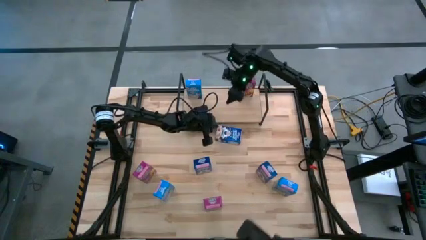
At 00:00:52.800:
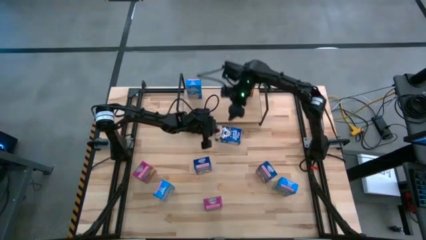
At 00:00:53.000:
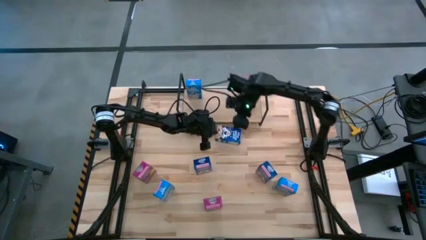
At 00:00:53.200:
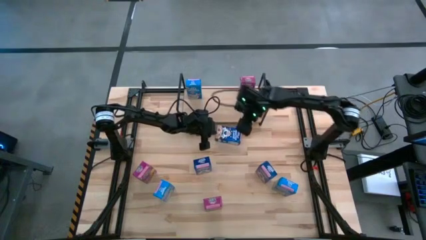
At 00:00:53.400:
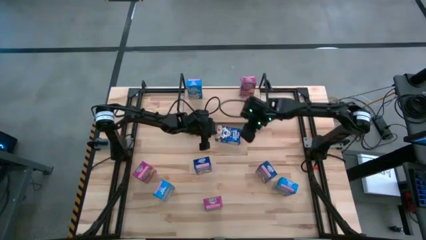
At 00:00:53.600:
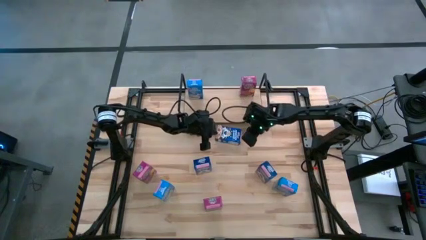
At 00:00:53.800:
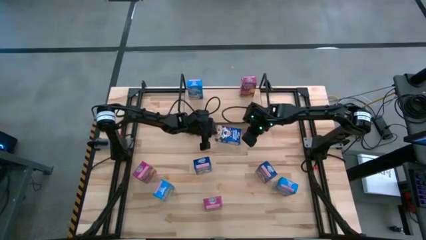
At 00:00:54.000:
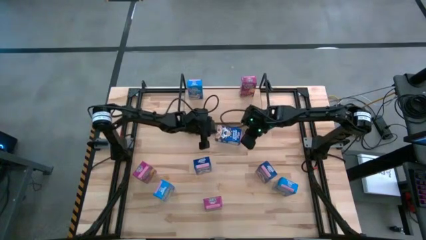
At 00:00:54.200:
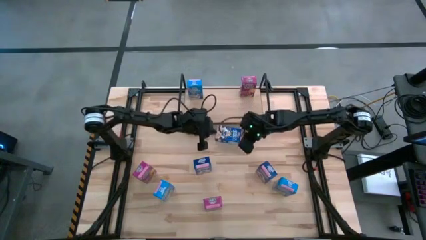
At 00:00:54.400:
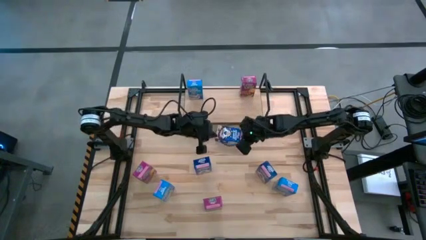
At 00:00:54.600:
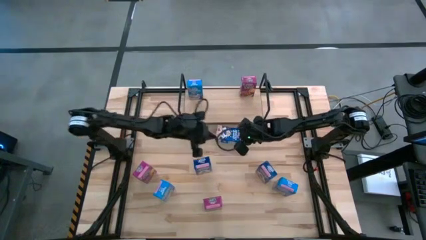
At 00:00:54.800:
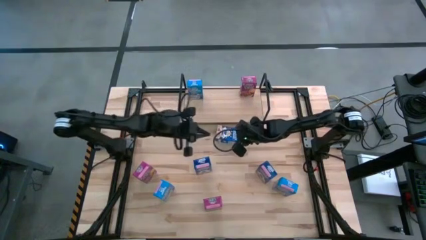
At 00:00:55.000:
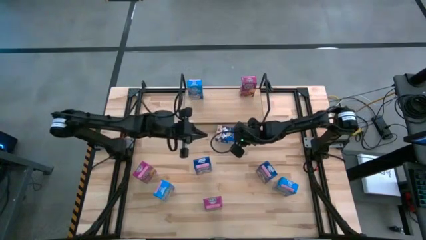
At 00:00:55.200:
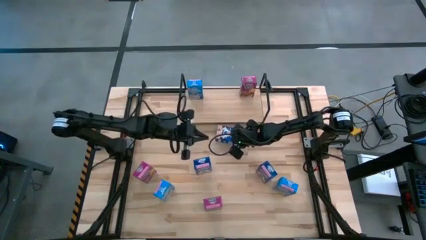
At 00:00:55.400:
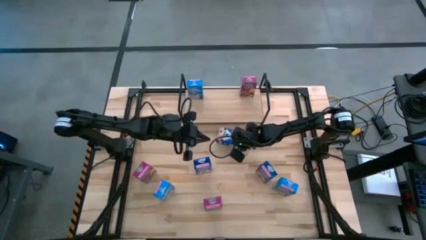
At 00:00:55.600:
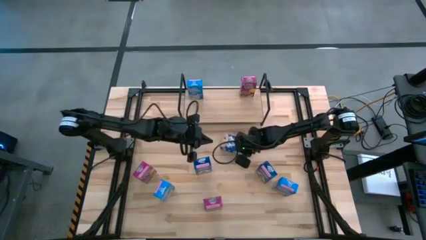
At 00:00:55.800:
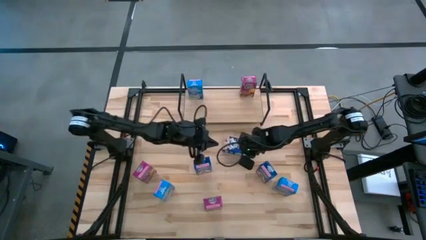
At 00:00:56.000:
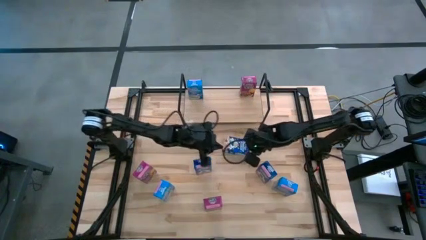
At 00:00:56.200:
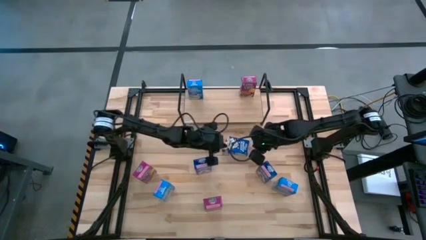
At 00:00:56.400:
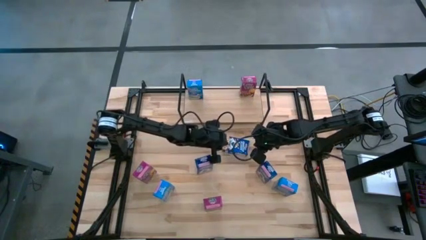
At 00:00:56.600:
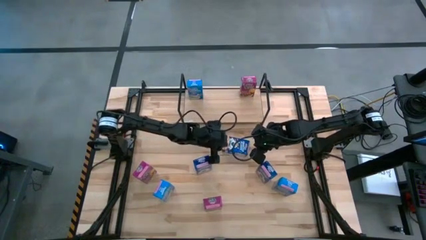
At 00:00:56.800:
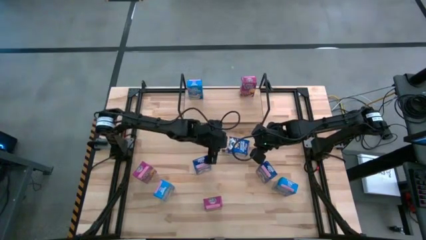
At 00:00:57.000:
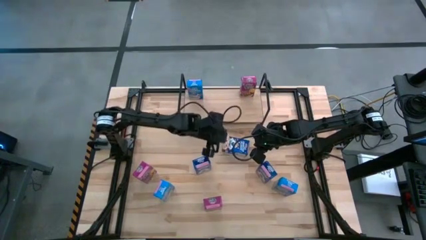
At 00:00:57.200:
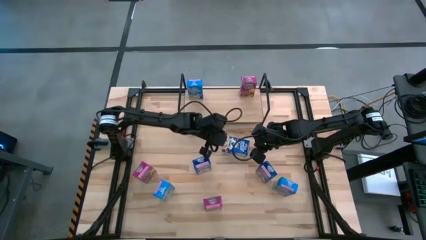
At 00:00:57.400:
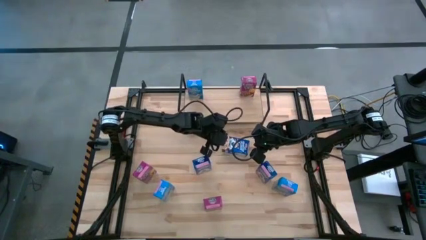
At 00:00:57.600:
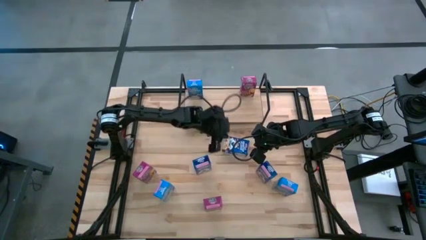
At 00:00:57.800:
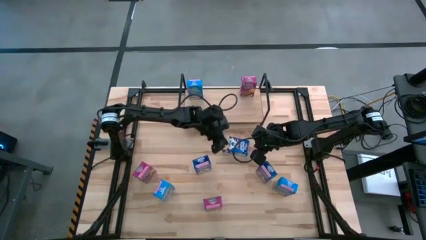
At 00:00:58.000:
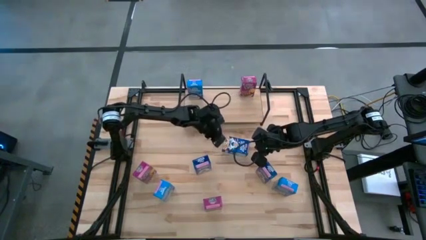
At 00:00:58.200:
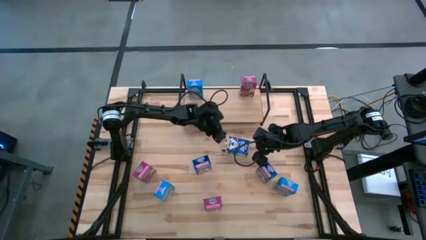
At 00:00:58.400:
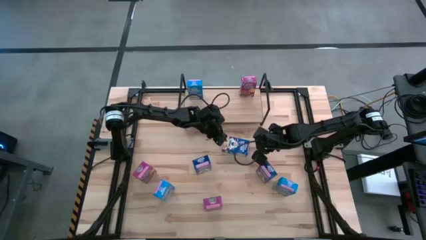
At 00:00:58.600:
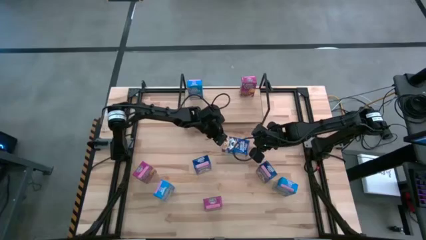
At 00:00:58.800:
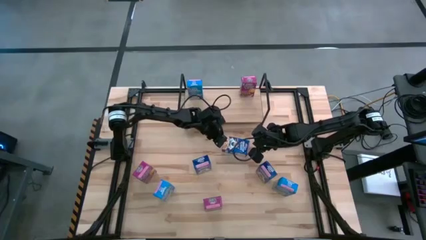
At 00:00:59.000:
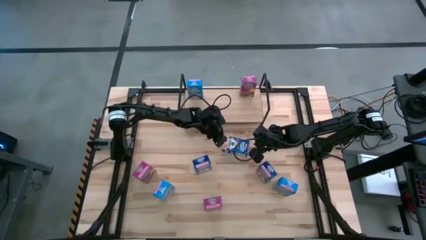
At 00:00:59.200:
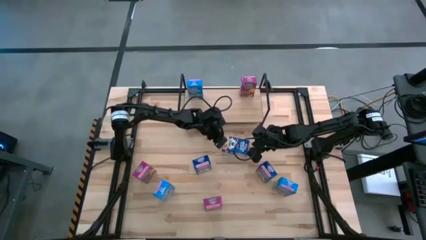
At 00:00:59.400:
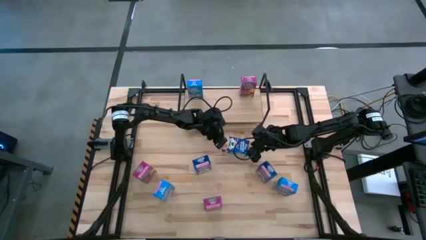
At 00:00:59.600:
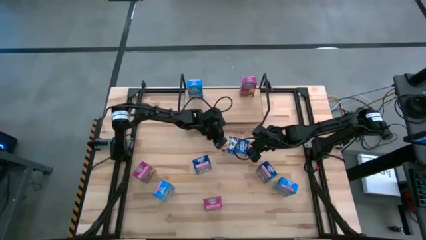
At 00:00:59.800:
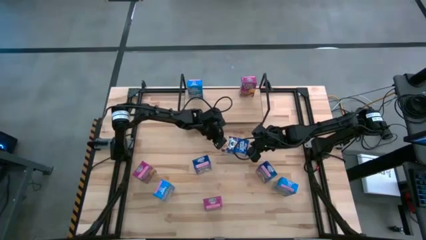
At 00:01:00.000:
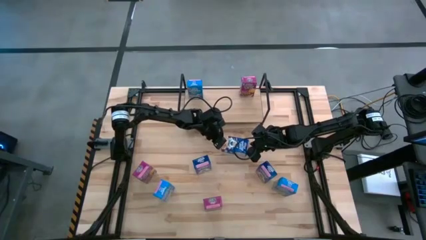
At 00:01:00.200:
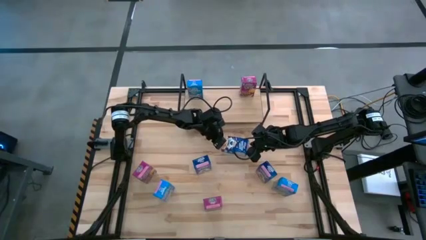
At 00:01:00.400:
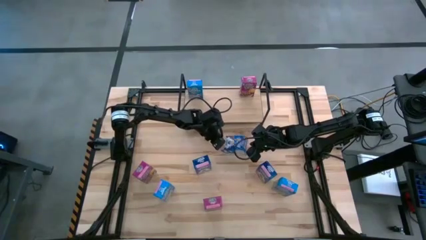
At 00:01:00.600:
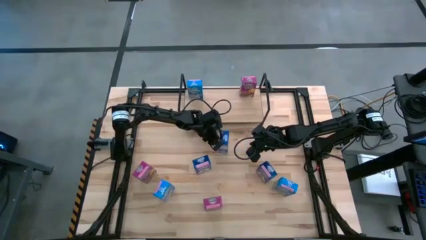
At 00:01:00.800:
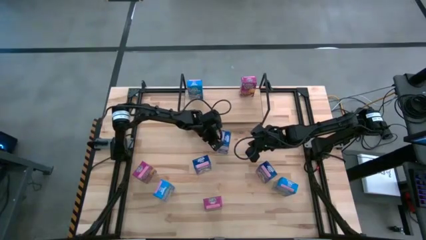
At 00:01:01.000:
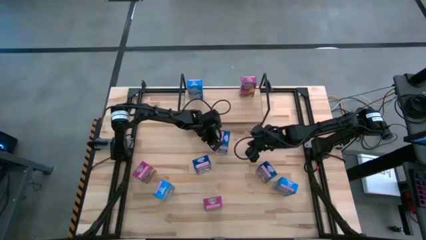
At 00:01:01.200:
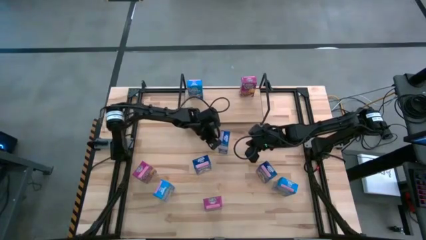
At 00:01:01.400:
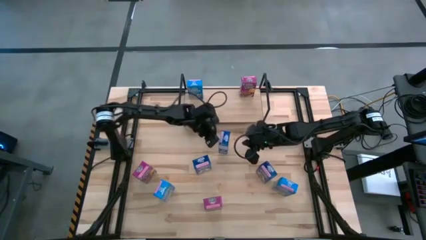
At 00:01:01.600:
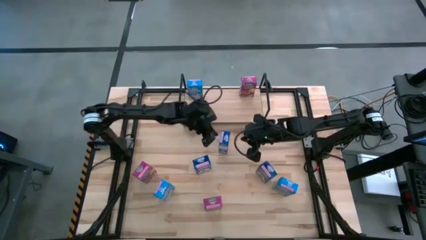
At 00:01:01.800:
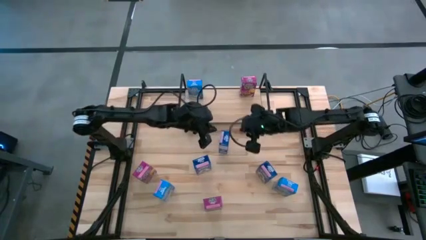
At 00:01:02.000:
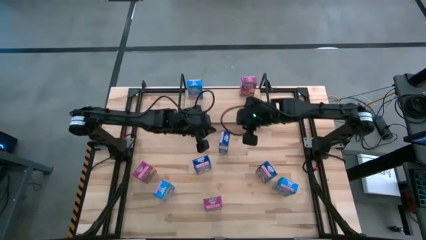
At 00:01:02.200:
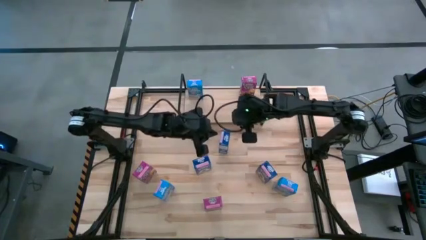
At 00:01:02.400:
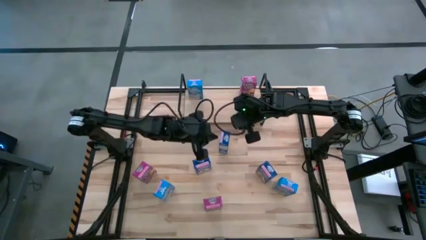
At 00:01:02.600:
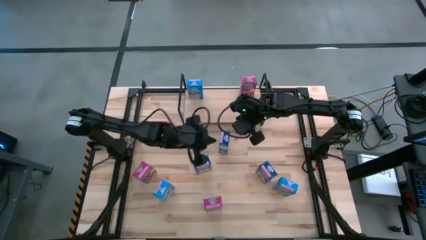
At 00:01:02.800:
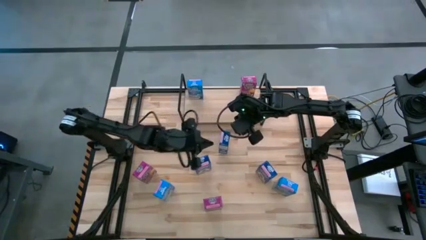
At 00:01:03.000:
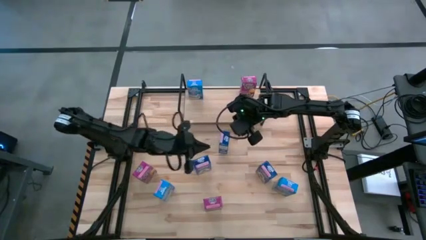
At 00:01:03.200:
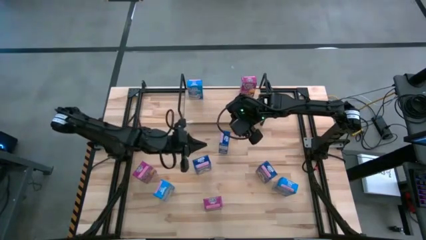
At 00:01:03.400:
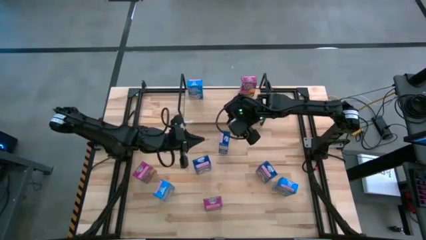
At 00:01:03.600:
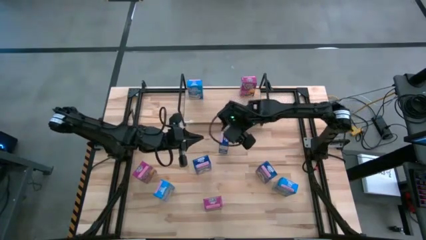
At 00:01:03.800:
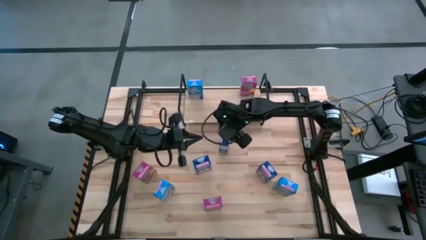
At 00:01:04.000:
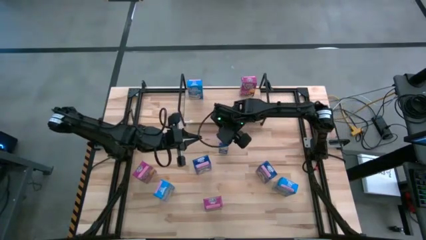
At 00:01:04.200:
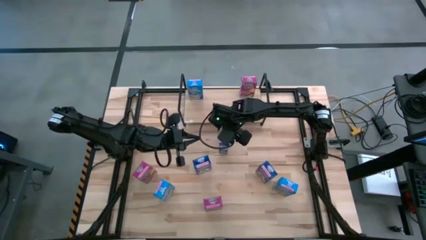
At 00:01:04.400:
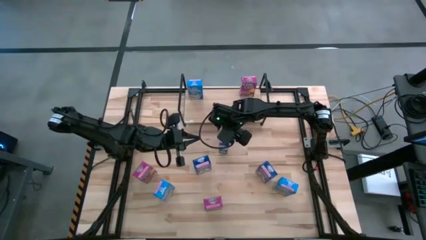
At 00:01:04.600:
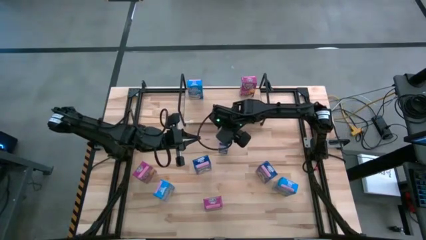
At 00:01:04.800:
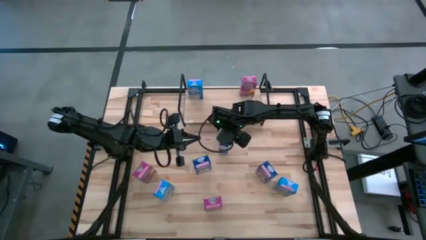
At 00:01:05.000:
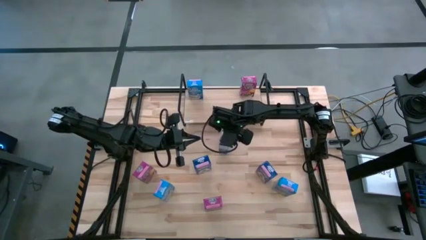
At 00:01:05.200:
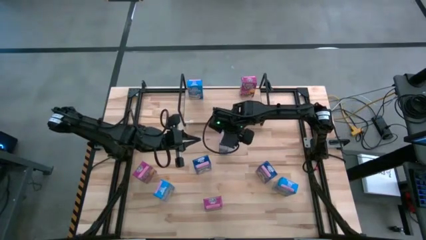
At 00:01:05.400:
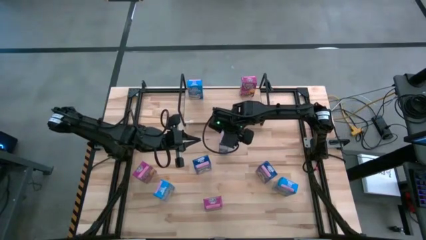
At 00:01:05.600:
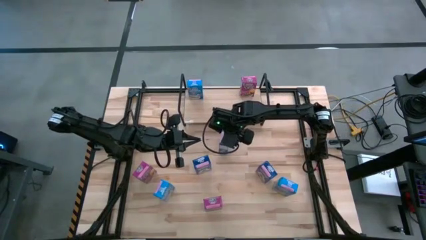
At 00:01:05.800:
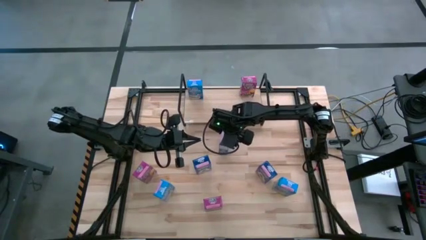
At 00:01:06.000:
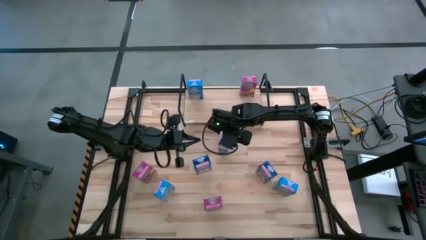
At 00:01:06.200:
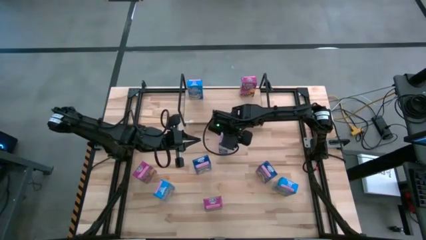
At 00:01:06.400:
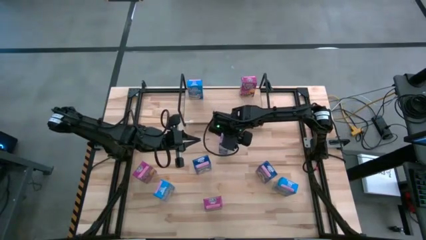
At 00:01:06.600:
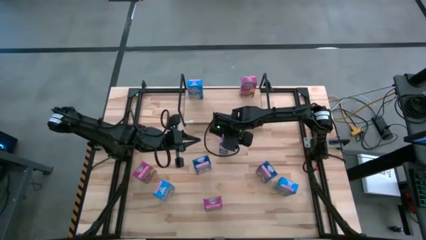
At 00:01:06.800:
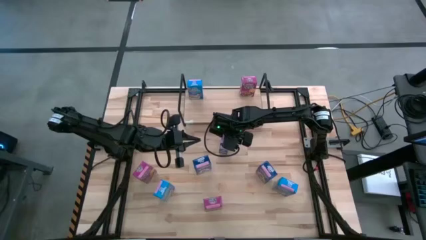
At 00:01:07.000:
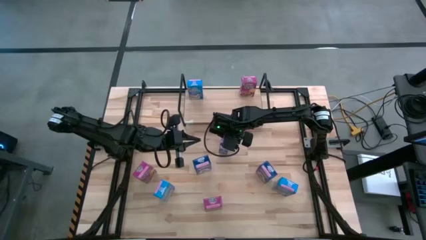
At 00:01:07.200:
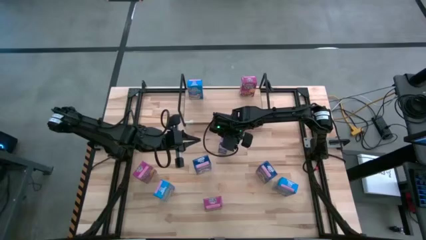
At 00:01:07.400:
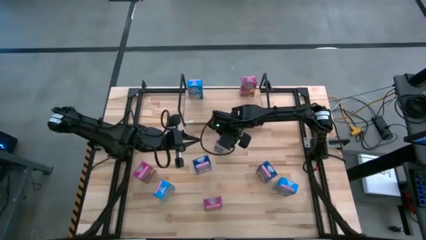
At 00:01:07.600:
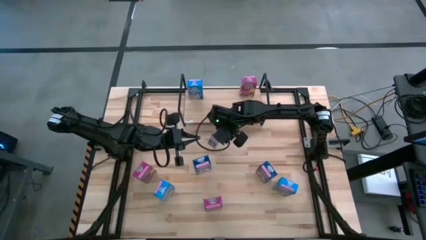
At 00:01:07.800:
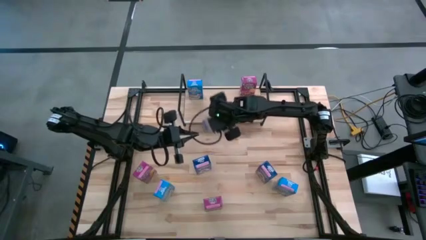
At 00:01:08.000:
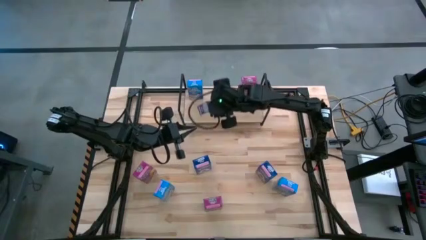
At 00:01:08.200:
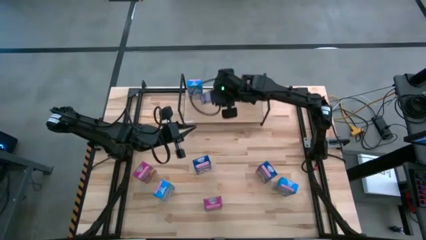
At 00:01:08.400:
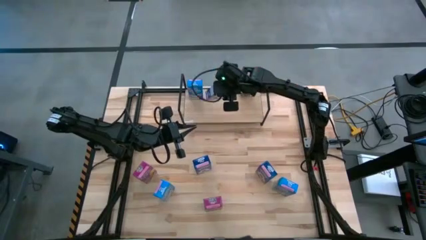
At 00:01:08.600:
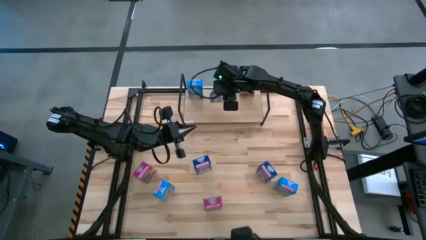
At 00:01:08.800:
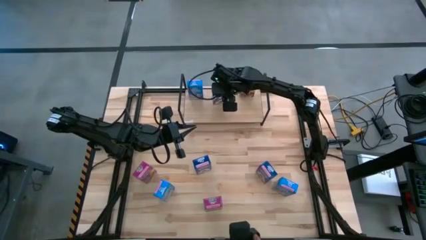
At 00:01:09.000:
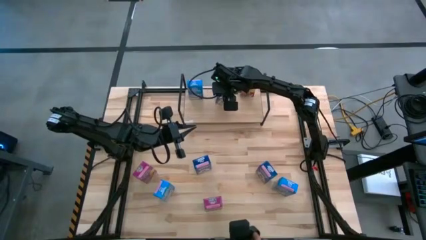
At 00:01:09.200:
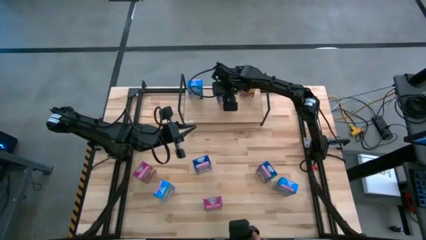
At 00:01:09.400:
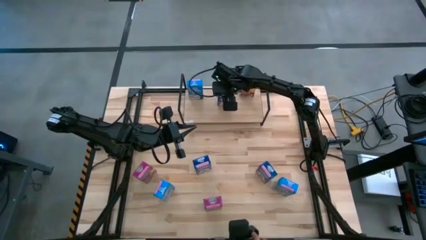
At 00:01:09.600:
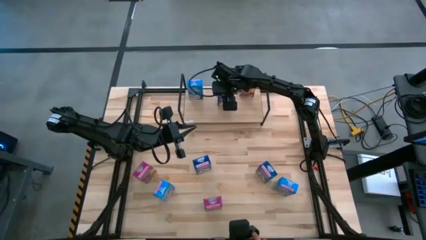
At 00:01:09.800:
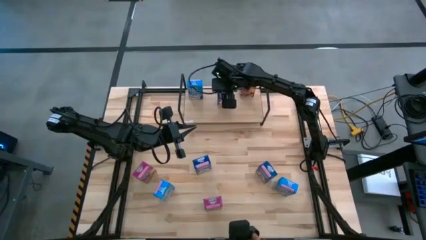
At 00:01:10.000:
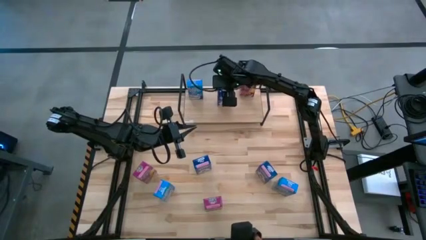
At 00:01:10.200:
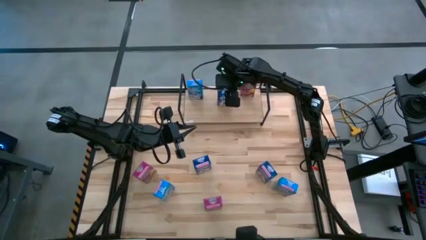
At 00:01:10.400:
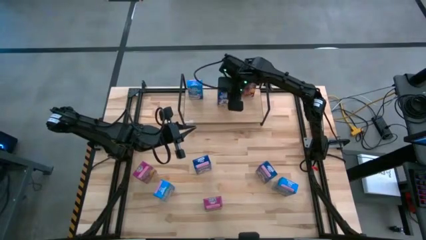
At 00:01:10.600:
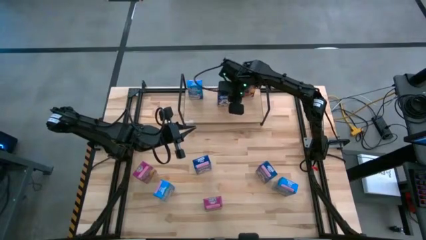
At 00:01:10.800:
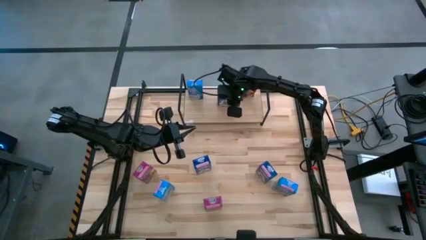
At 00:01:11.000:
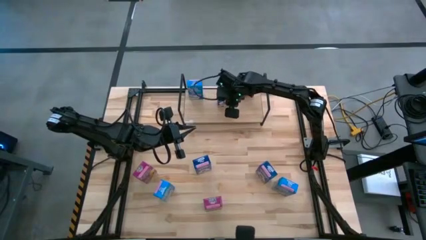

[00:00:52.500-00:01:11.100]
Task: Stack cereal on shelf
Put the top dark blue cereal box on the shelf Adjust the dark blue cereal box
